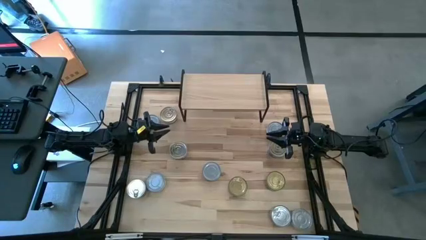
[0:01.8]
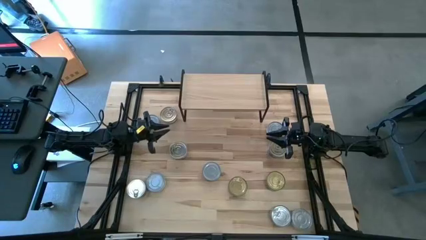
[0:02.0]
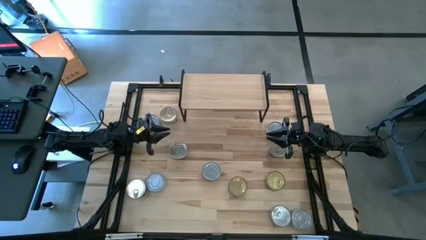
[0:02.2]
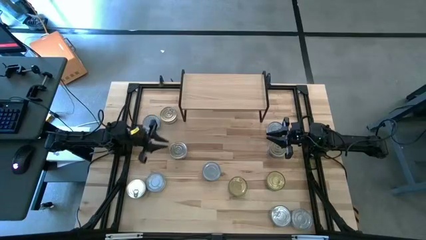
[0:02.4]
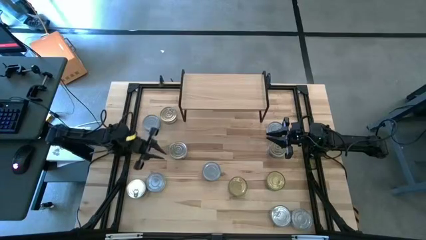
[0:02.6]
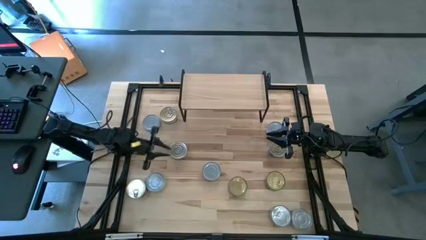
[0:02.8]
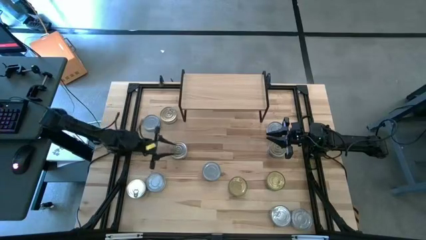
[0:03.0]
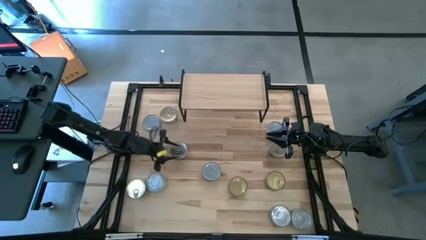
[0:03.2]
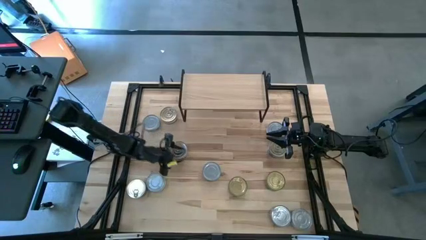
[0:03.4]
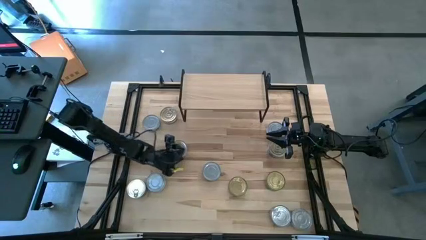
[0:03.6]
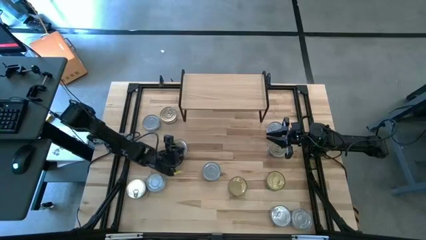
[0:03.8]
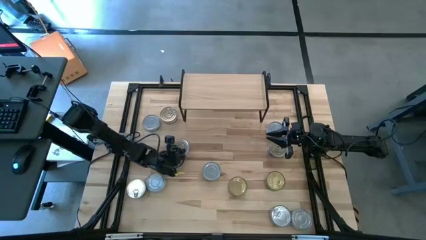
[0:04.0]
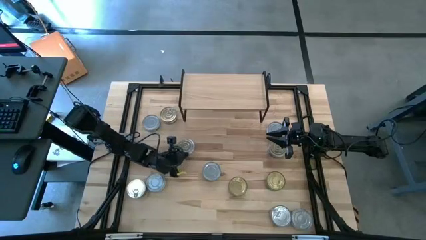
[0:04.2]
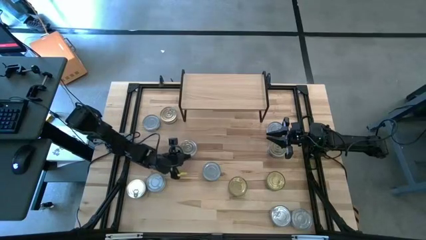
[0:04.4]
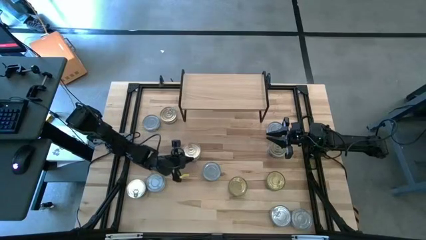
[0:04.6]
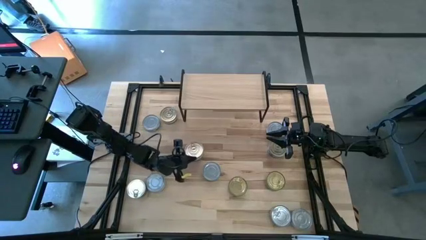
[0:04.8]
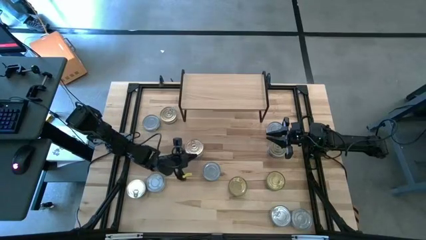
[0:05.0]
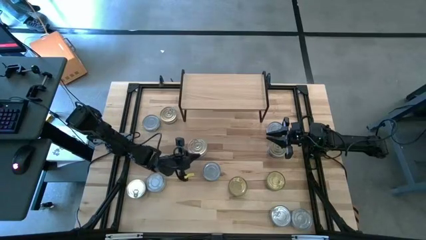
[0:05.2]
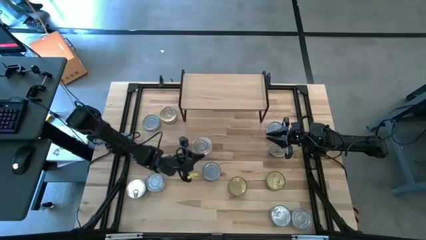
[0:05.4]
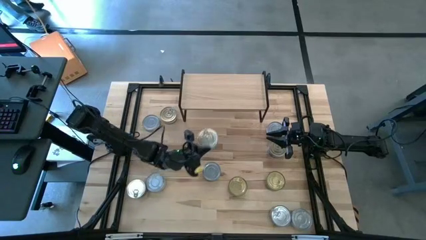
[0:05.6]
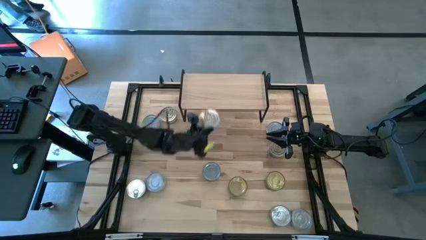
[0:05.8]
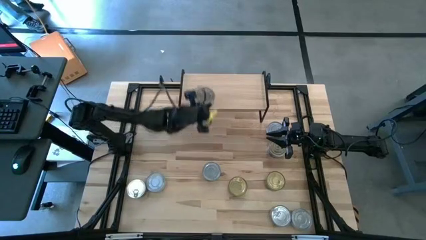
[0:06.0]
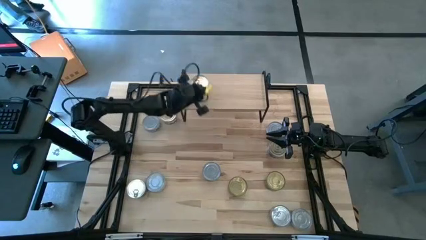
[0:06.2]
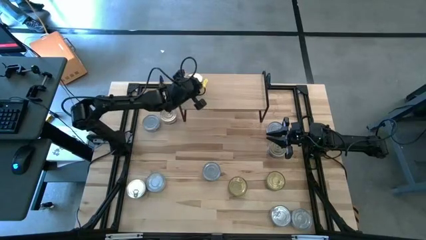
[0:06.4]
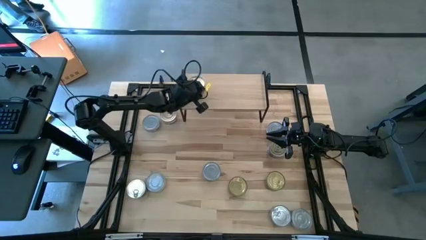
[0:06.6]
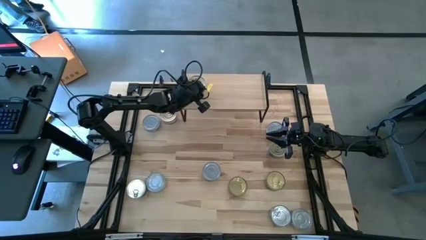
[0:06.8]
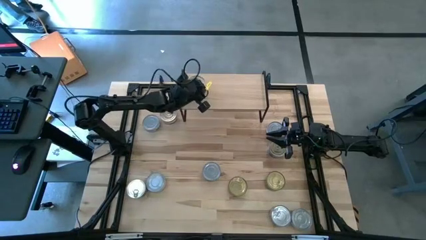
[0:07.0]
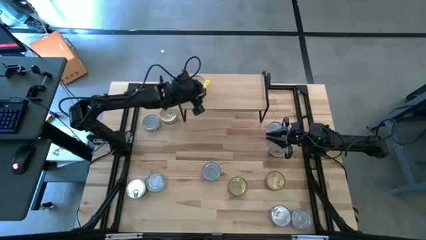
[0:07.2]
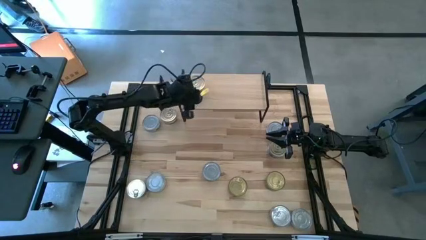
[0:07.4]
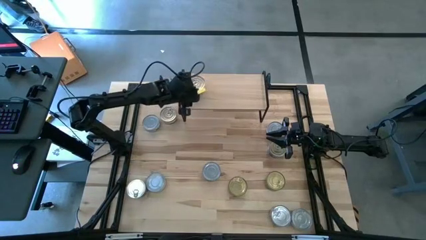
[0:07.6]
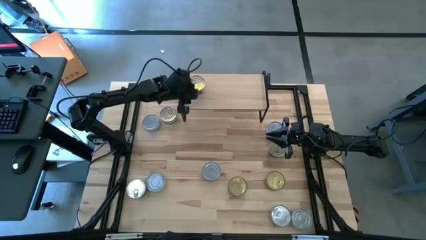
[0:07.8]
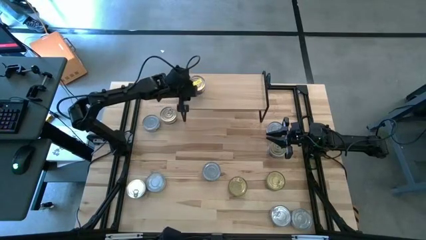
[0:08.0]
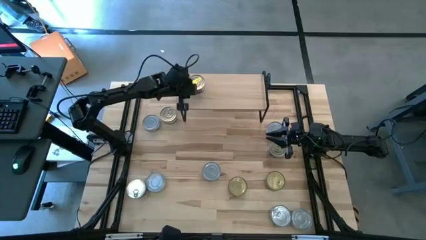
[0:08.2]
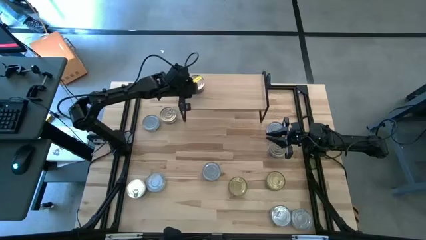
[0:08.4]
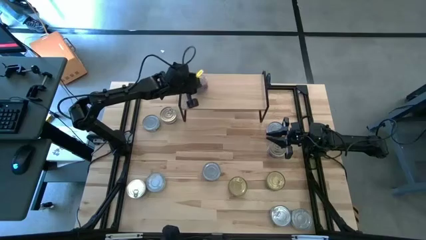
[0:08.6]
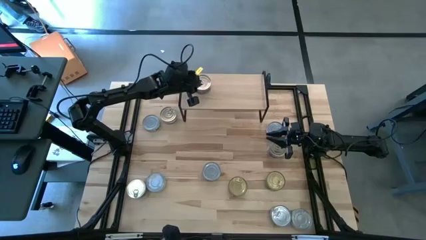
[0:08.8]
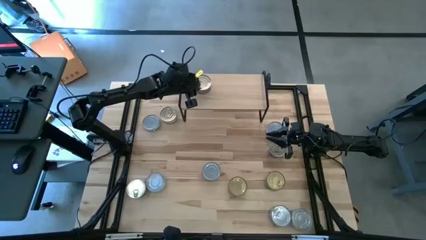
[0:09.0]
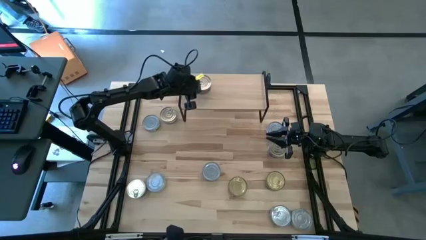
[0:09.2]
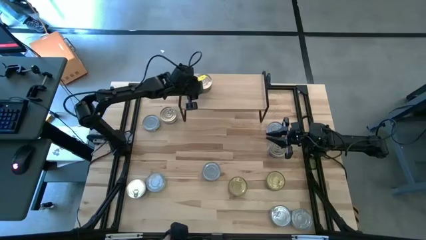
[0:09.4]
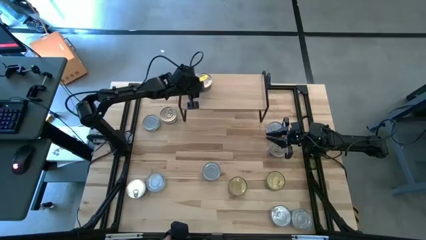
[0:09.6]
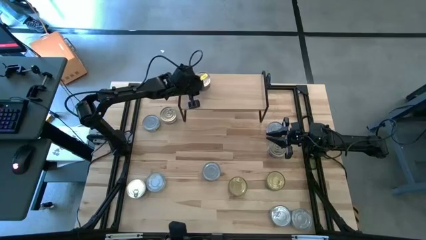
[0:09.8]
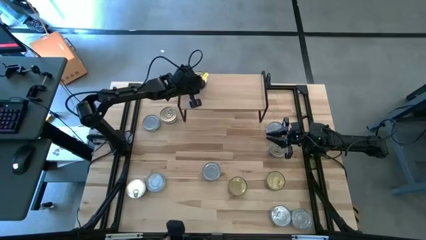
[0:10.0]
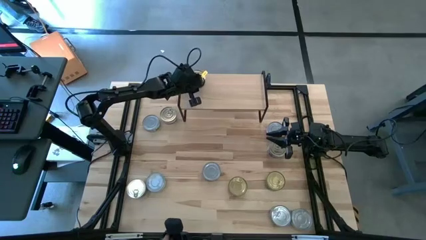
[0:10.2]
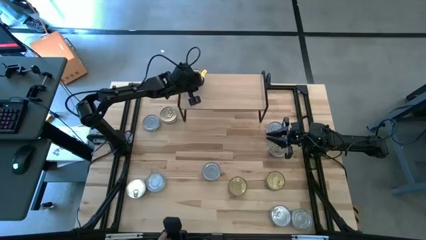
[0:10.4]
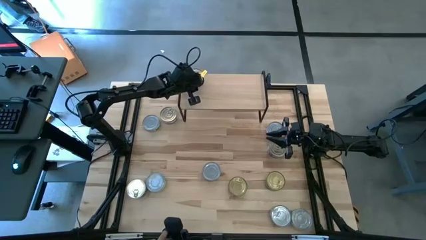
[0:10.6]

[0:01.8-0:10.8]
Task: Stack canned seafood by type on shelf
Put the blue tuna can on the shelf

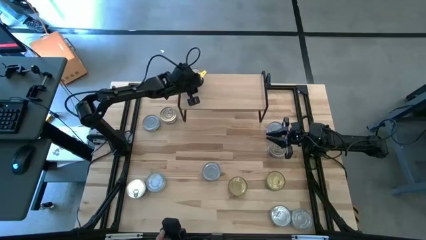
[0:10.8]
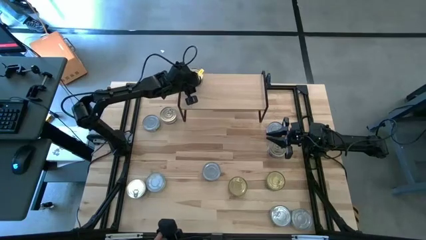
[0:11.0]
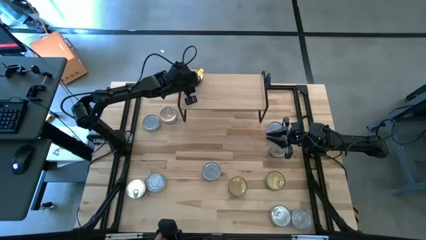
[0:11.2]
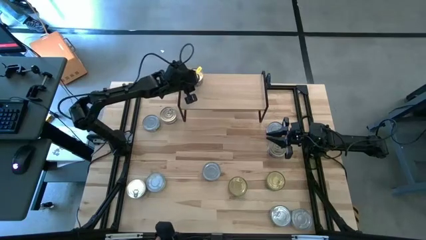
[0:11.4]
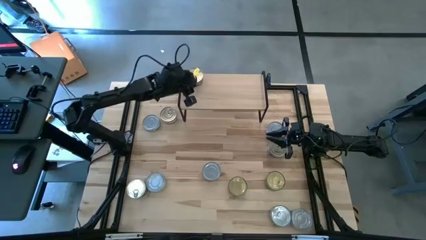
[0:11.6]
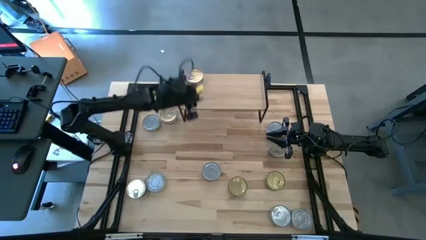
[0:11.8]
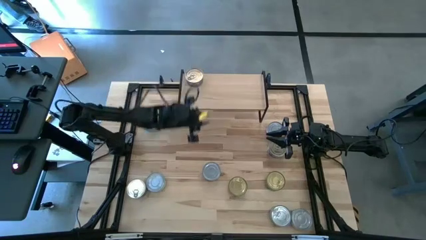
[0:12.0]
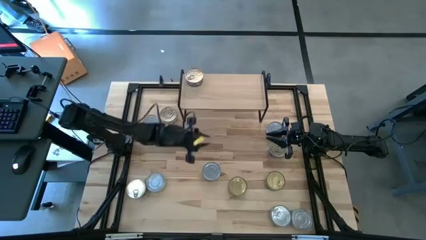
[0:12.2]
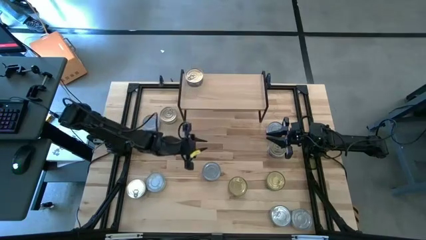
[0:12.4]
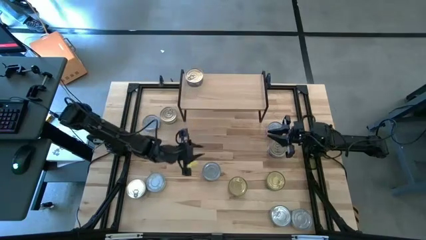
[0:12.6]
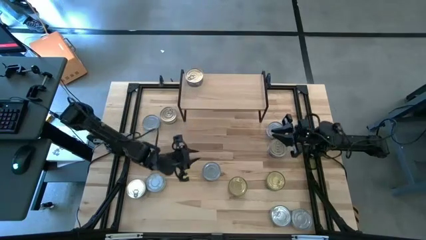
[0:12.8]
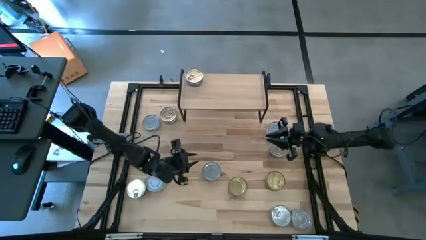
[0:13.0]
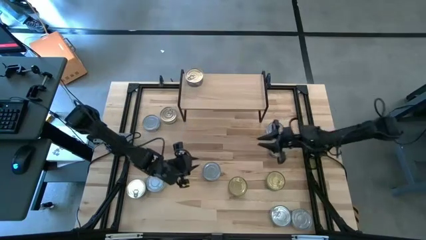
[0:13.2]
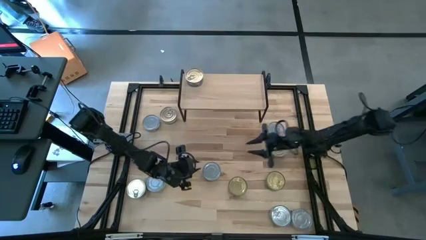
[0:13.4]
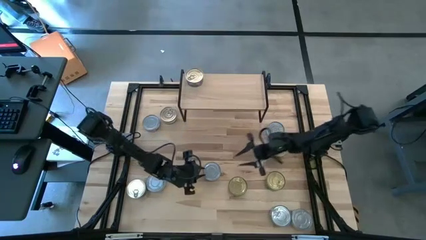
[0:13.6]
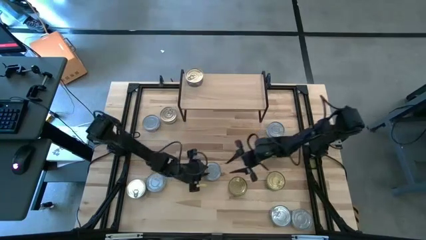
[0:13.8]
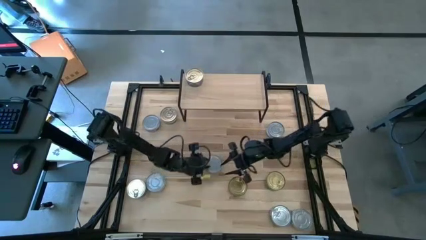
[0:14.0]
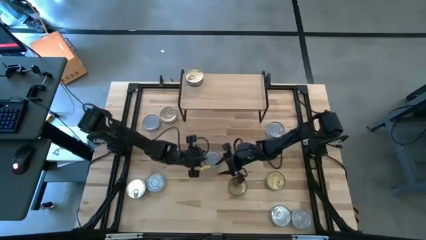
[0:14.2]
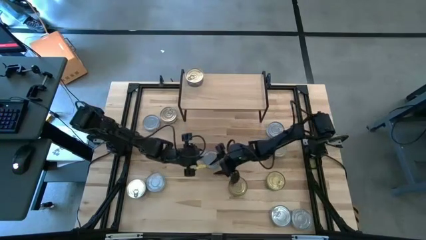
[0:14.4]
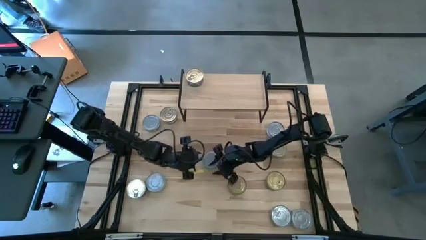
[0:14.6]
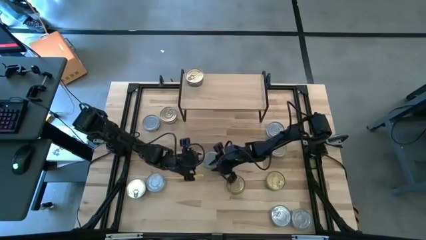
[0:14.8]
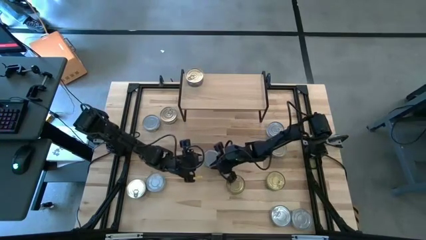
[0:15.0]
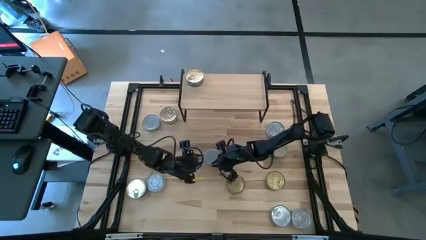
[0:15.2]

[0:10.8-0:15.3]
Put the green tuna can on the shelf

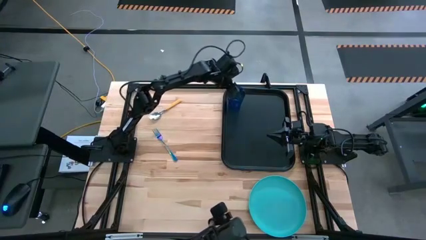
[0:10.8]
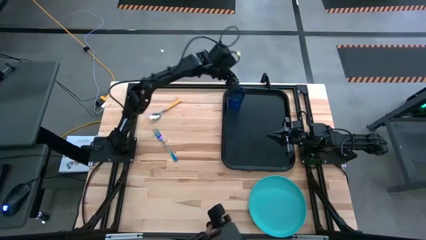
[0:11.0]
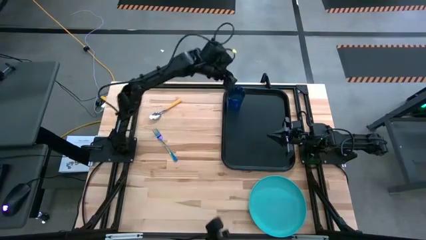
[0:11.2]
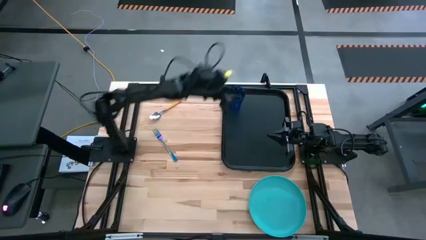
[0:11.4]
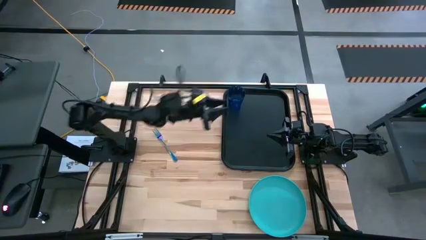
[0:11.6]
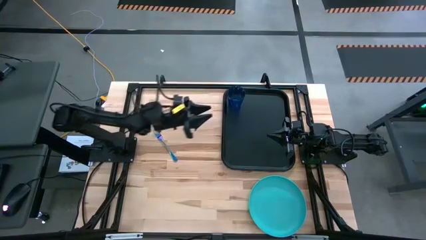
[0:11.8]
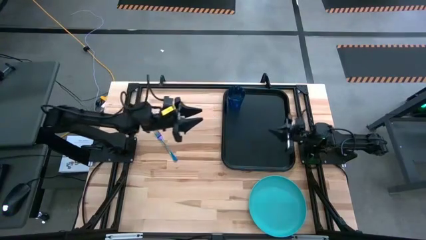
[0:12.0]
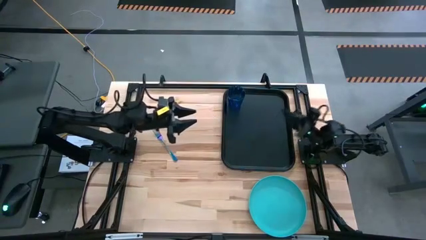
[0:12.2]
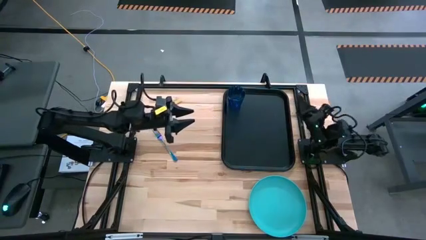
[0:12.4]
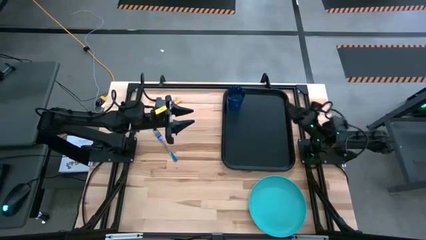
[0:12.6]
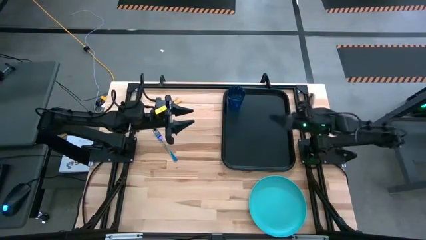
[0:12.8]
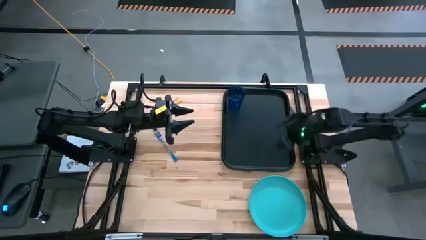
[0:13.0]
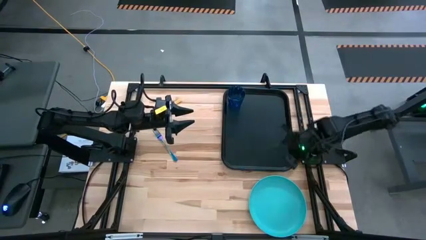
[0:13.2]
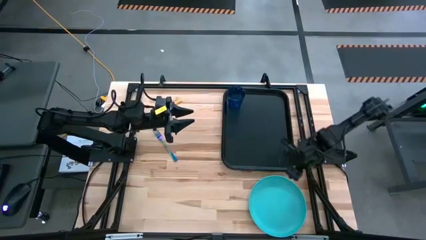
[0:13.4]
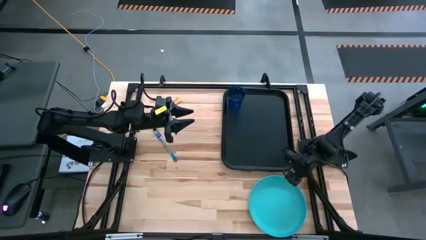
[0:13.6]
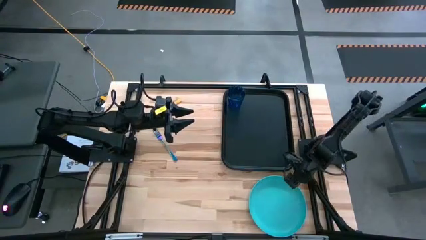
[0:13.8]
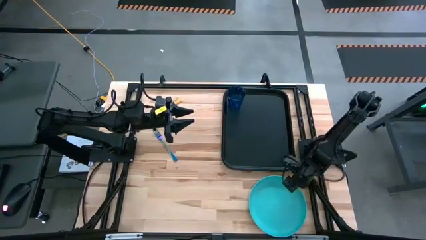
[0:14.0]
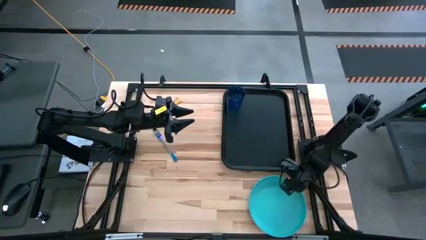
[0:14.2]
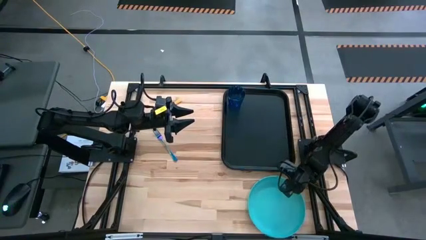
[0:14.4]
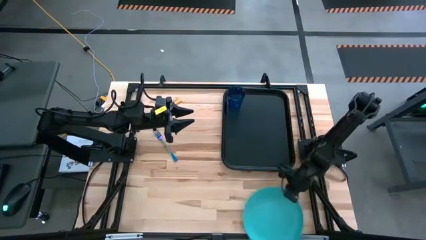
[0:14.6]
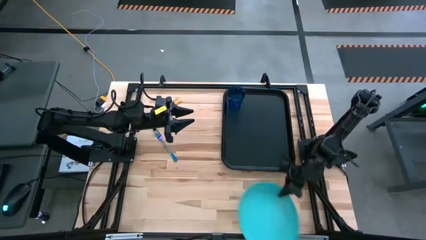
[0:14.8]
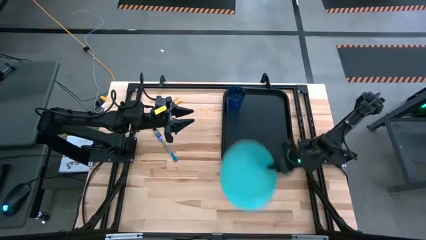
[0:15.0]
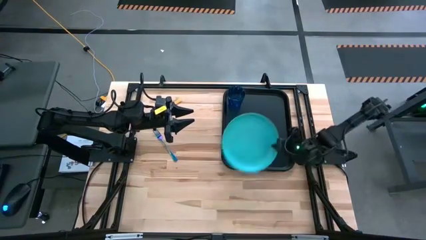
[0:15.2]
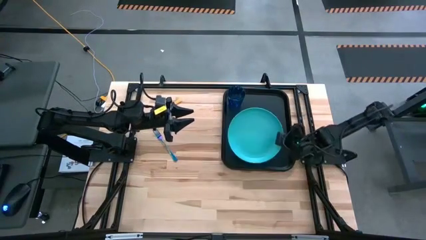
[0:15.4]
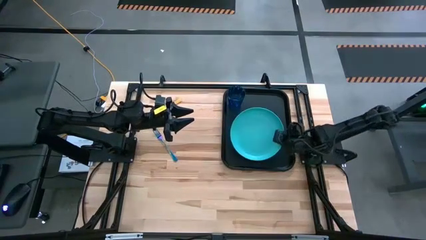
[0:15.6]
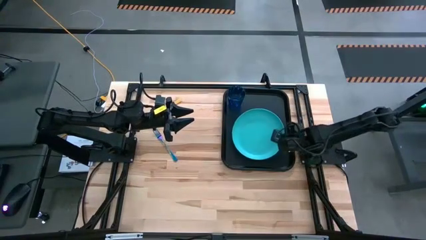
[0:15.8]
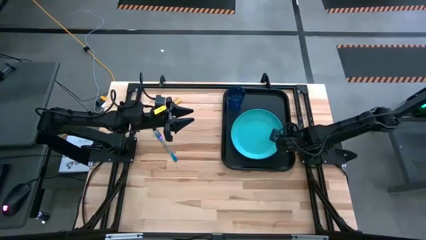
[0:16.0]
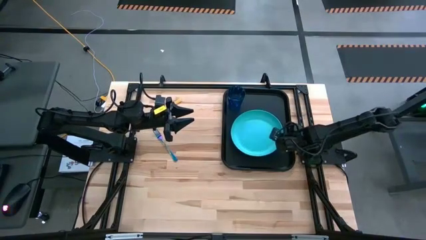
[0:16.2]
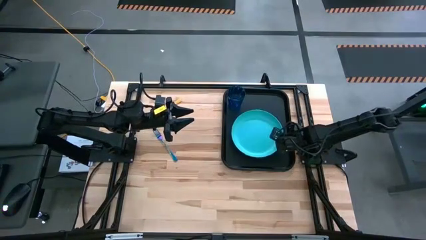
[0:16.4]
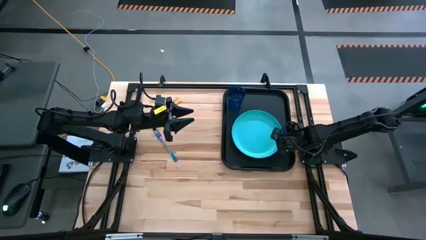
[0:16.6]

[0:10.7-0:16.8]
Task: Pick and place plate/cup/fork/spoon on tray
Put the blue plate on the black tray to the bottom of the blue cup
